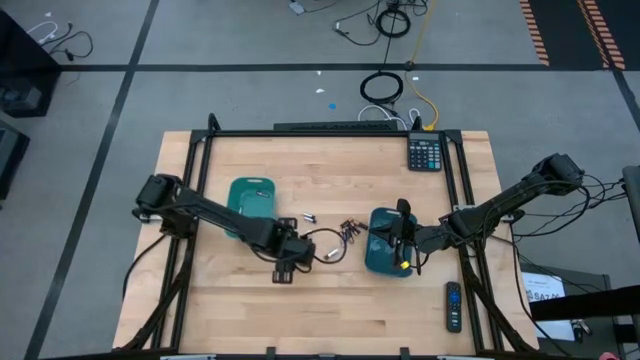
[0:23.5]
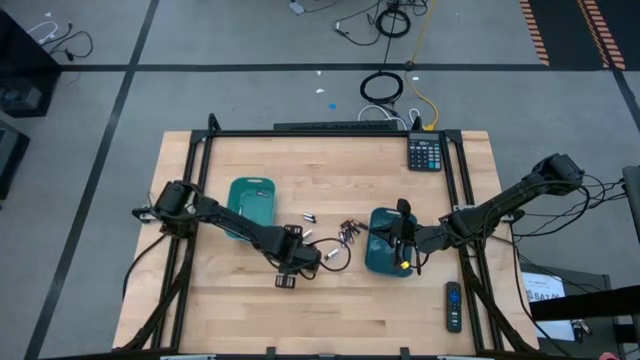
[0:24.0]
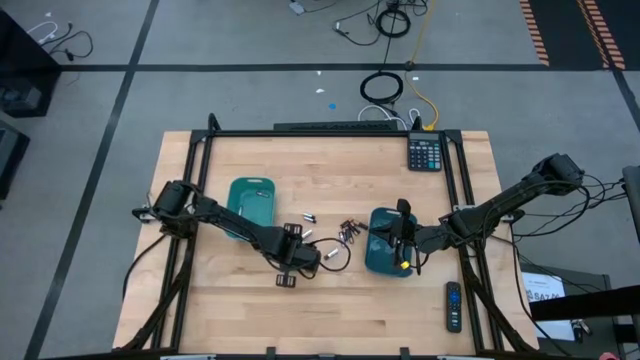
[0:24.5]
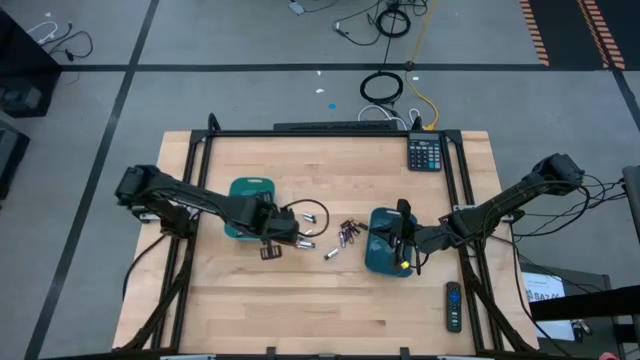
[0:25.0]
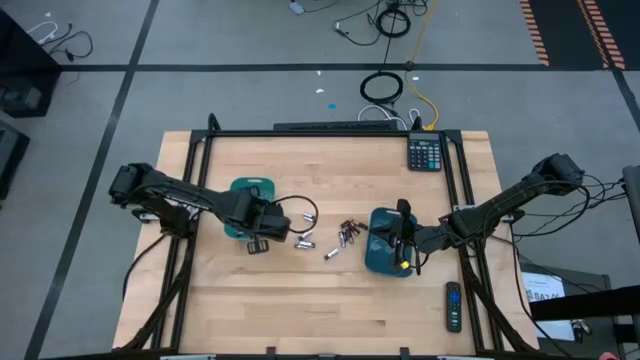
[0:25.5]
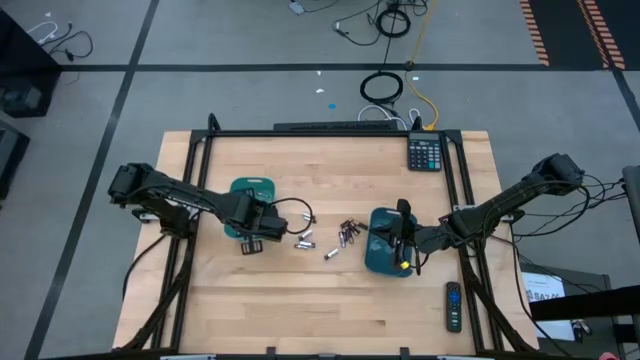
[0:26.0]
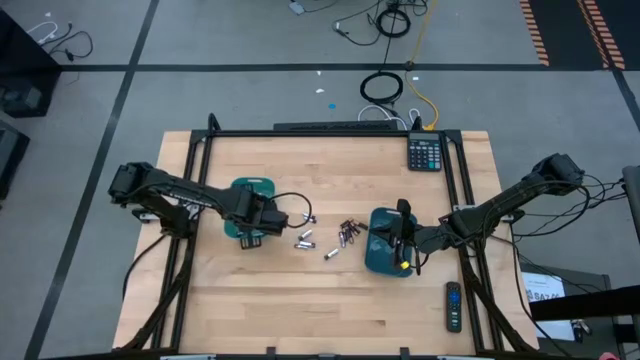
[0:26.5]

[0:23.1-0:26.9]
Task: Sort batteries
Put the silver battery into the green bin

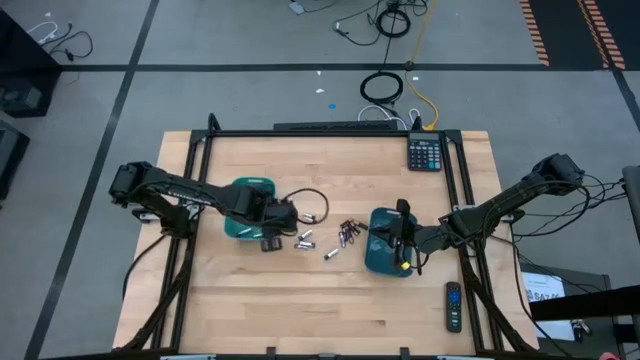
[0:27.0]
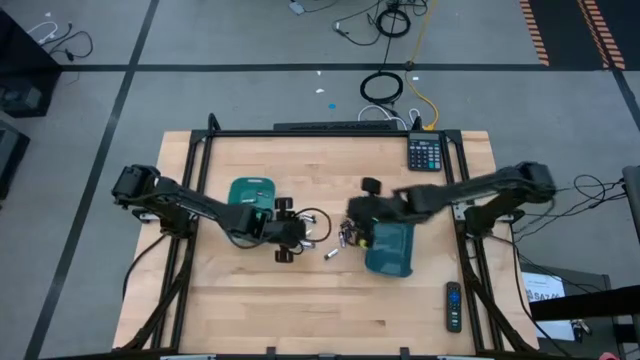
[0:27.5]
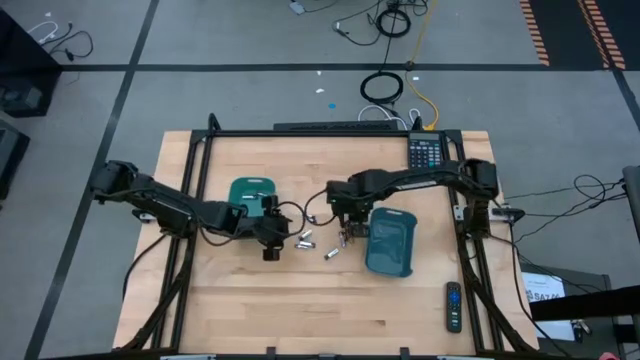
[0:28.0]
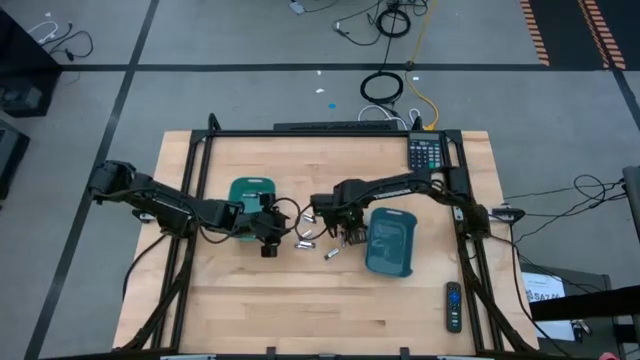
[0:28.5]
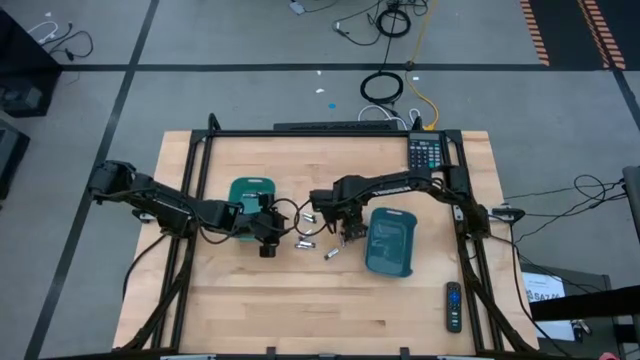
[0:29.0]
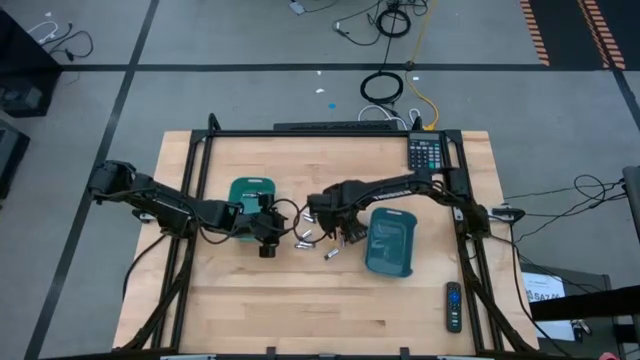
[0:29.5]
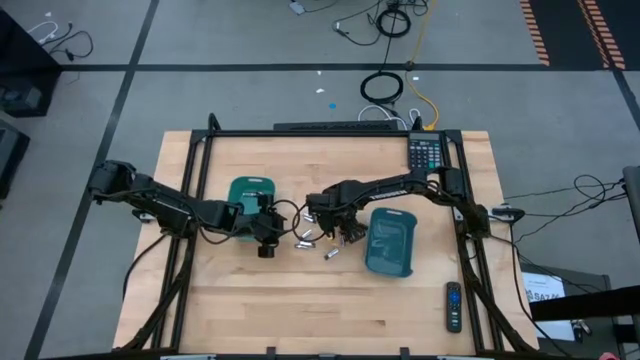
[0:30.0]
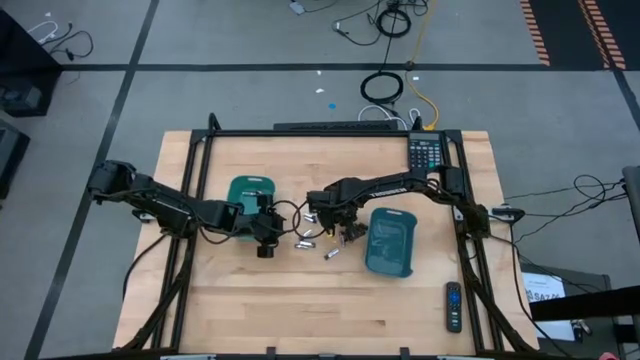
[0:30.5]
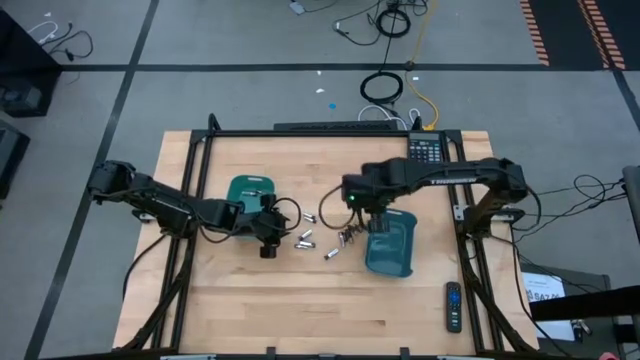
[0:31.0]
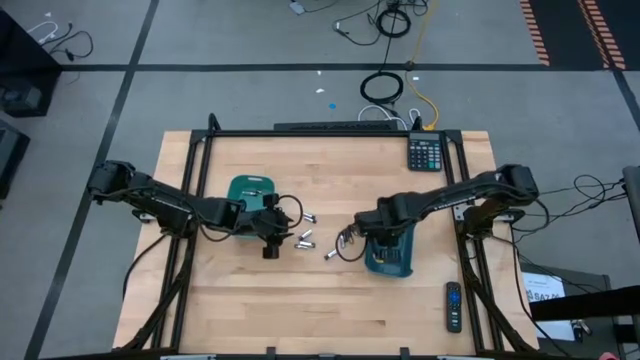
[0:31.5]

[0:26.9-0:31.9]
Put the black battery into the blue bin

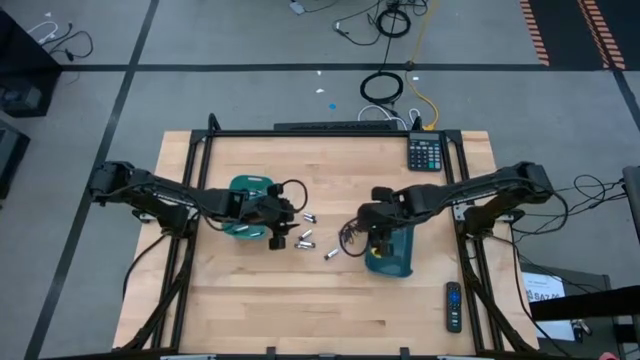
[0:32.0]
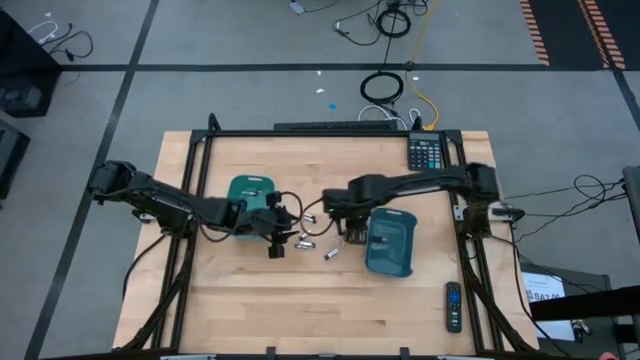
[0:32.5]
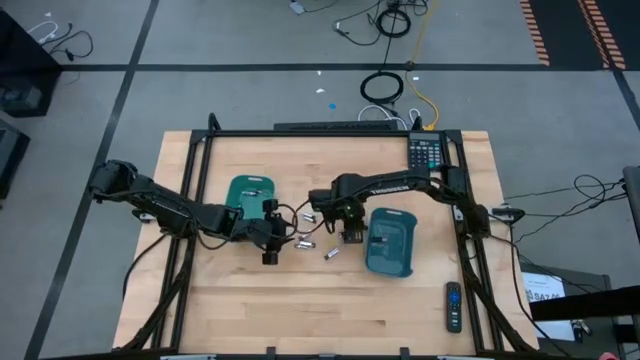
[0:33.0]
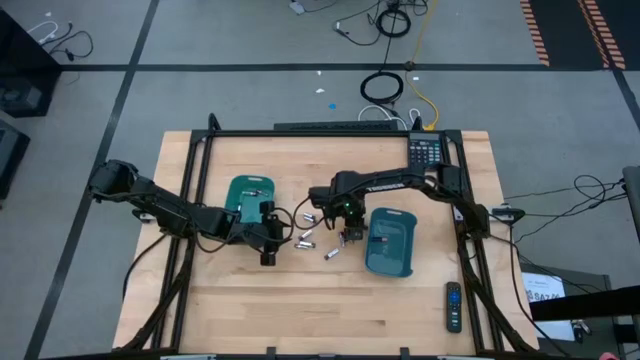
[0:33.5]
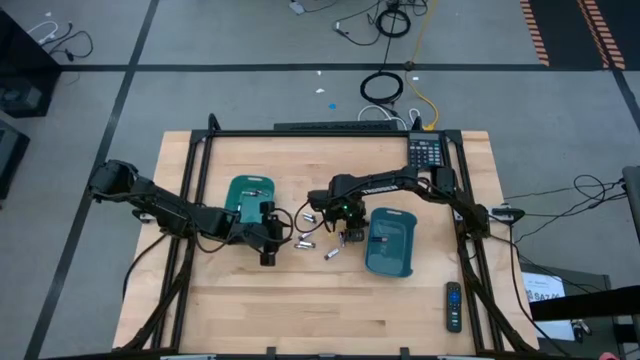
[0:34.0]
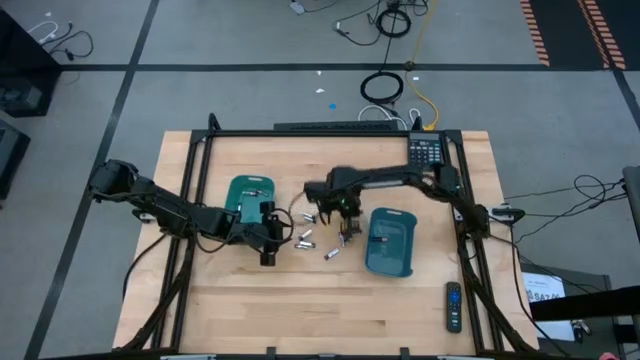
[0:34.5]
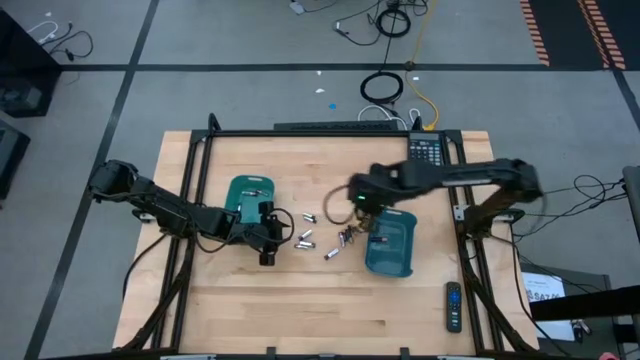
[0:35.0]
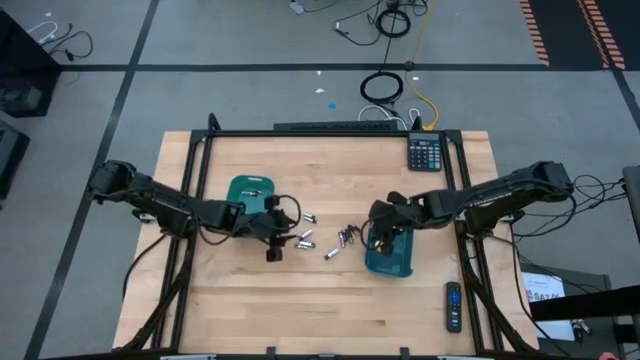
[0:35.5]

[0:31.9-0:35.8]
Put the black battery into the blue bin

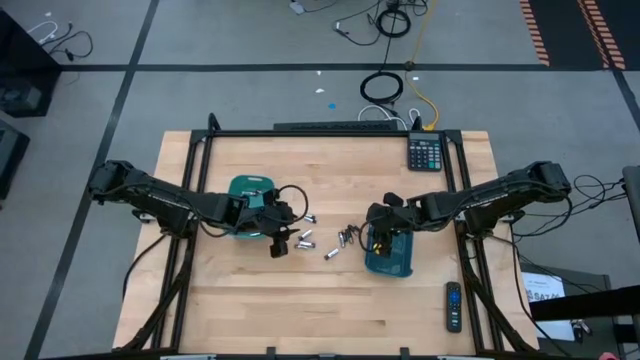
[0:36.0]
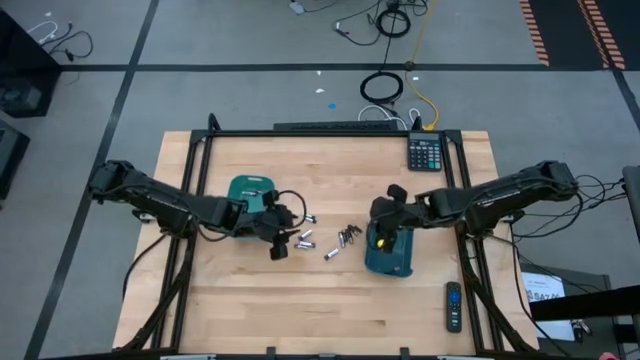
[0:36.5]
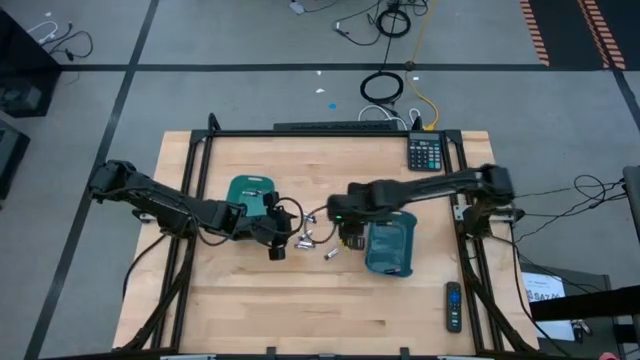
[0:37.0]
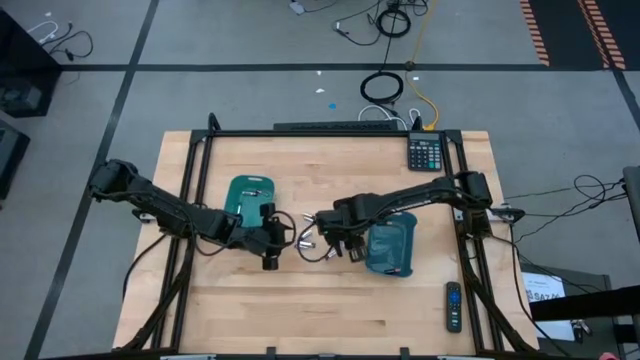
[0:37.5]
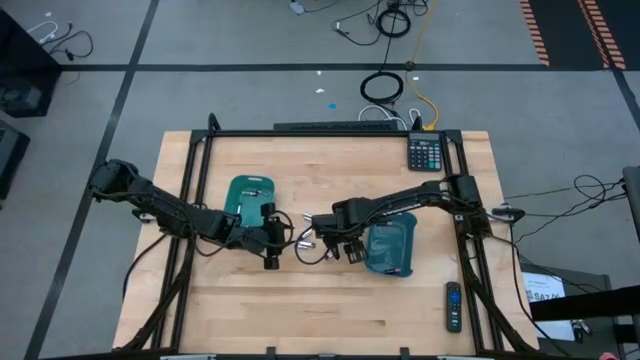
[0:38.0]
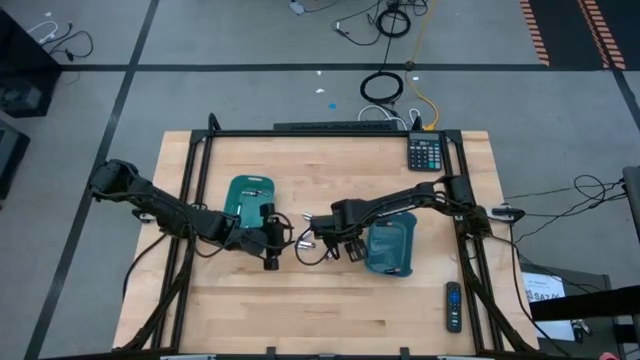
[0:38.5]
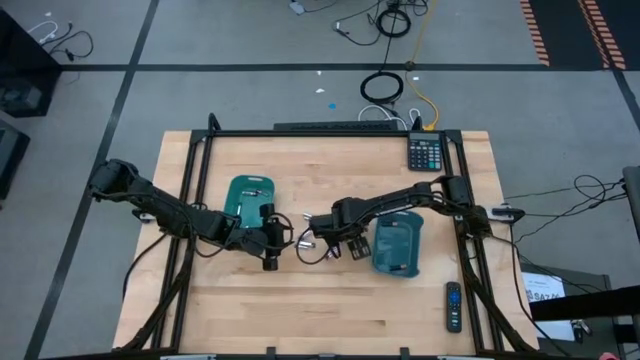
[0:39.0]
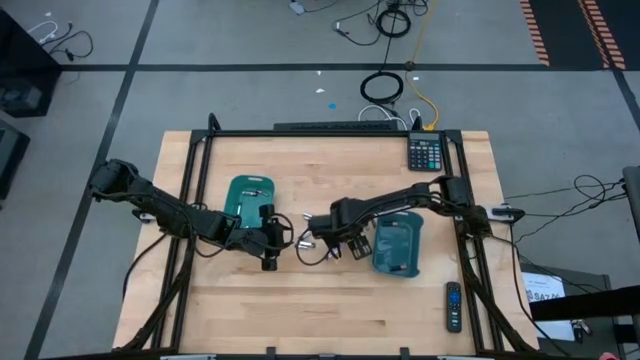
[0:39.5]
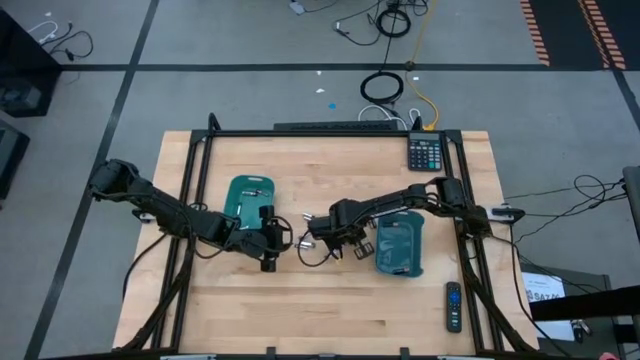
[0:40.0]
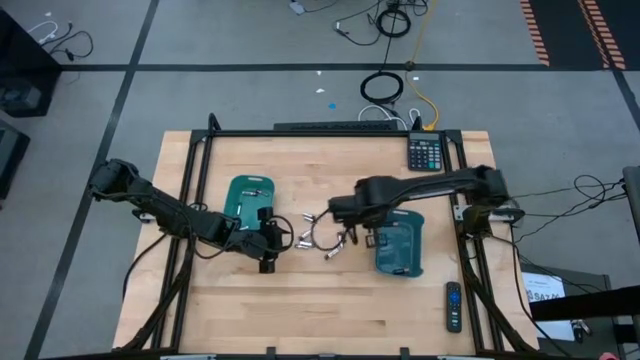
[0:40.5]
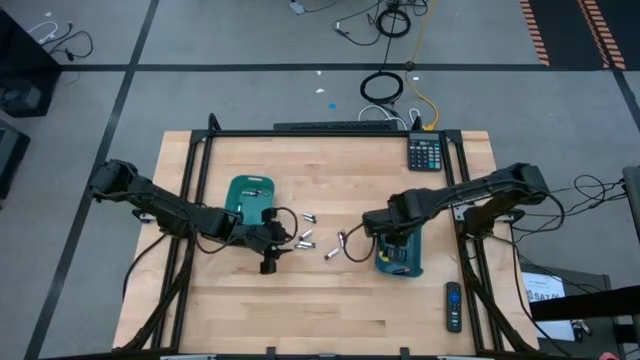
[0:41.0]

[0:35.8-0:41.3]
Put the black battery into the blue bin

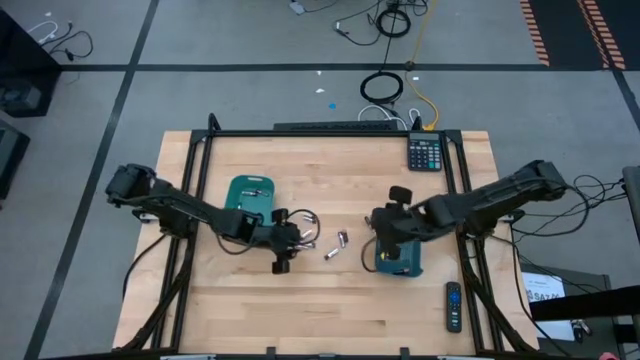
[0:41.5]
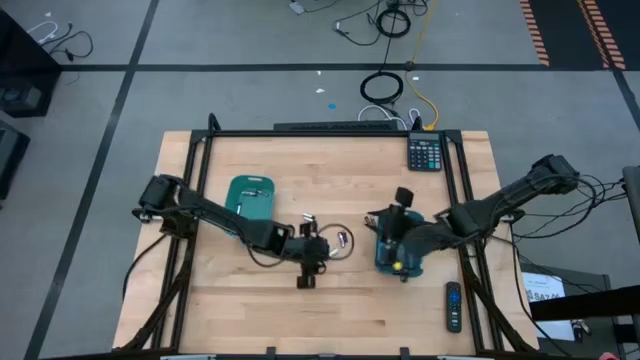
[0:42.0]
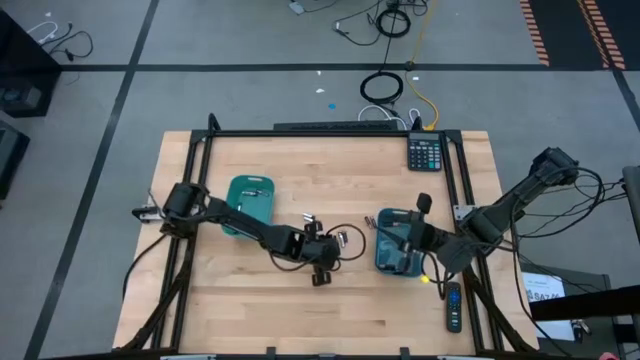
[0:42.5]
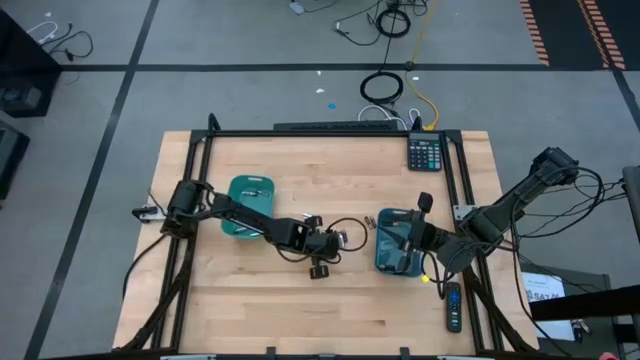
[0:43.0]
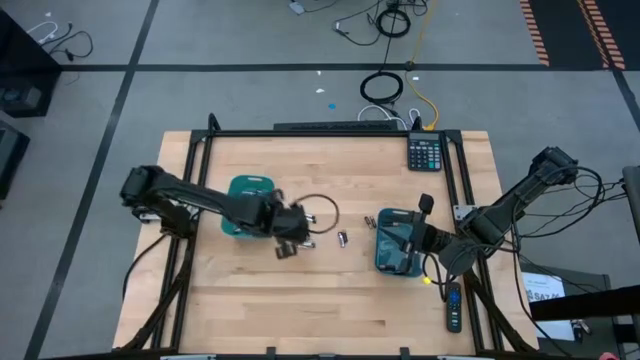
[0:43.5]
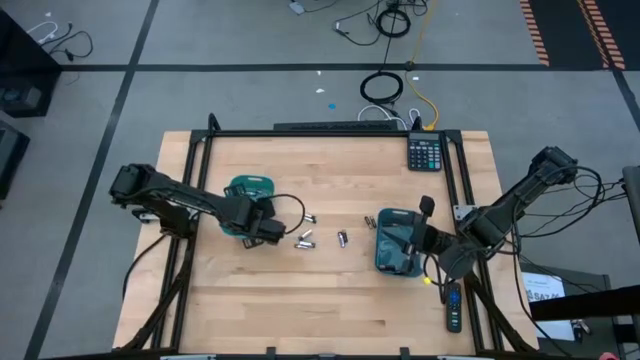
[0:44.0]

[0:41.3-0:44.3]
Put the silver battery into the green bin
